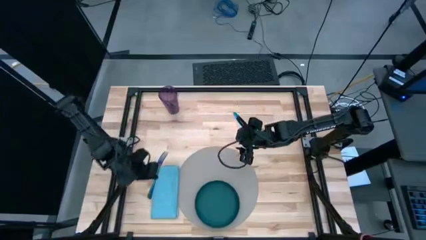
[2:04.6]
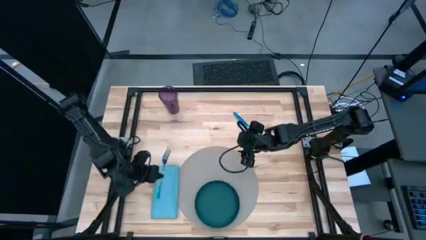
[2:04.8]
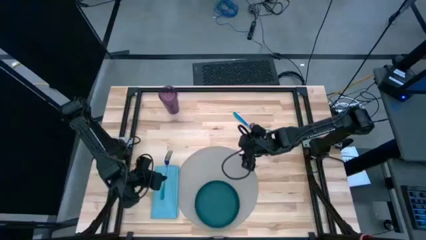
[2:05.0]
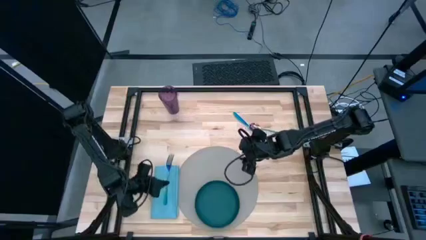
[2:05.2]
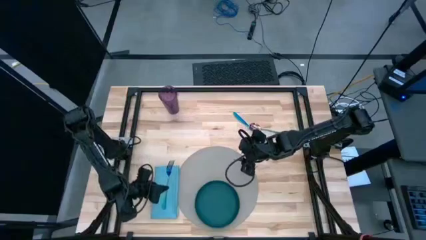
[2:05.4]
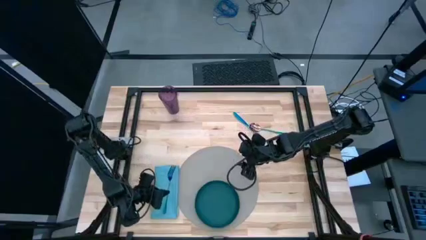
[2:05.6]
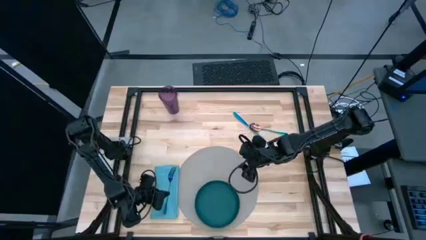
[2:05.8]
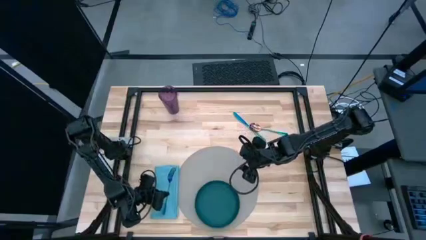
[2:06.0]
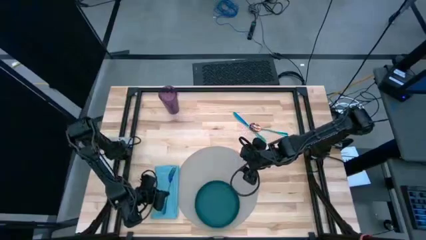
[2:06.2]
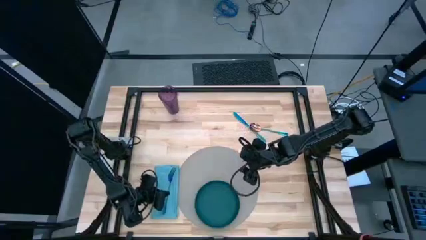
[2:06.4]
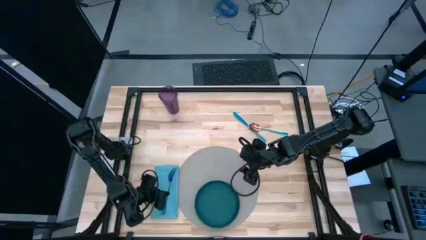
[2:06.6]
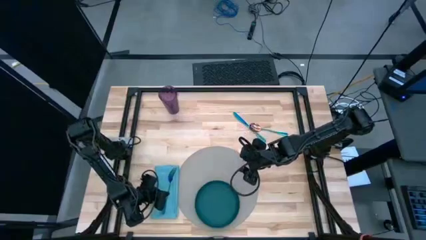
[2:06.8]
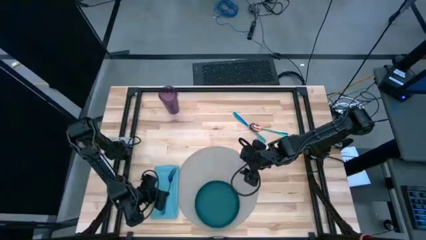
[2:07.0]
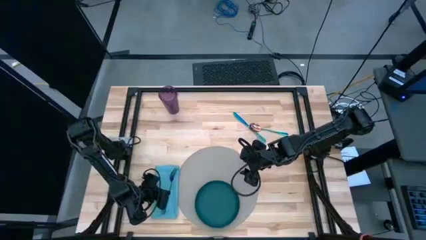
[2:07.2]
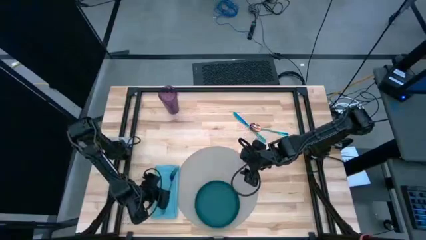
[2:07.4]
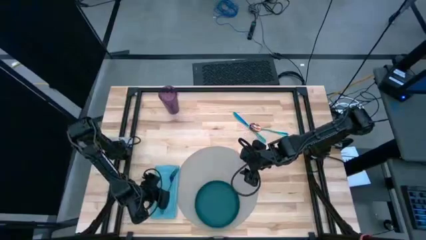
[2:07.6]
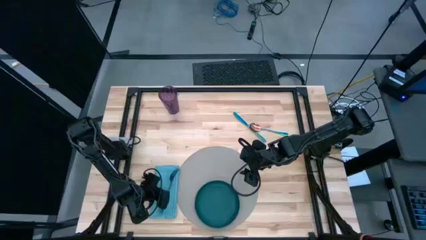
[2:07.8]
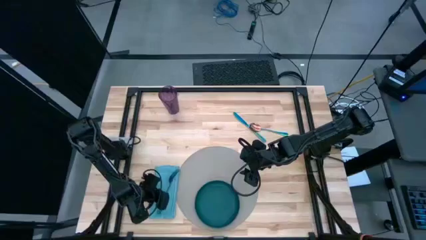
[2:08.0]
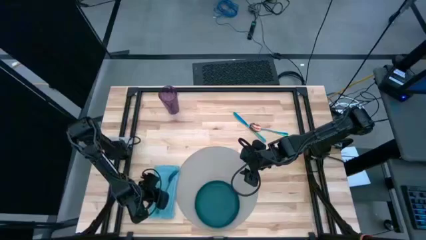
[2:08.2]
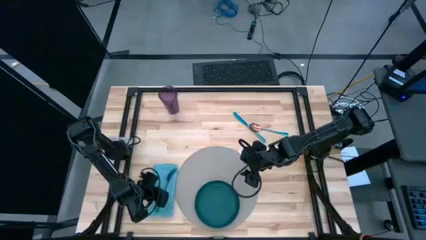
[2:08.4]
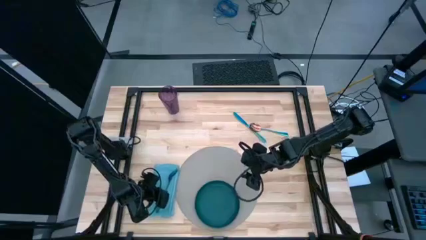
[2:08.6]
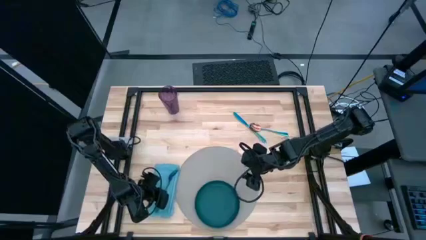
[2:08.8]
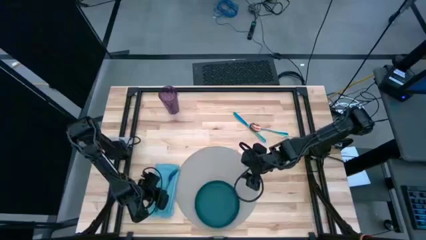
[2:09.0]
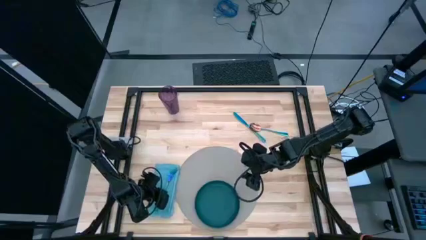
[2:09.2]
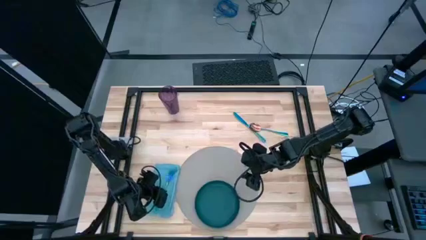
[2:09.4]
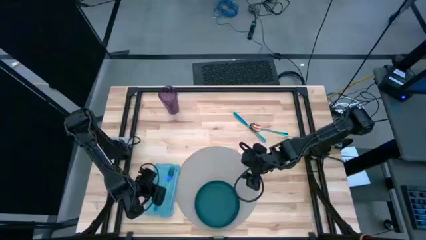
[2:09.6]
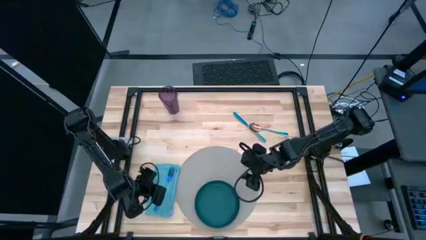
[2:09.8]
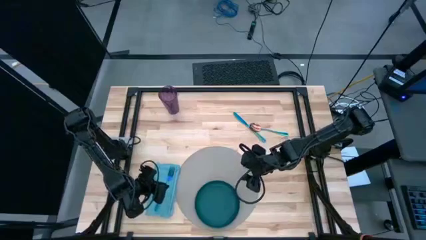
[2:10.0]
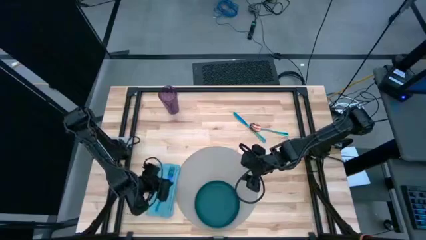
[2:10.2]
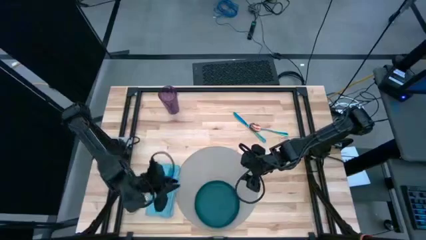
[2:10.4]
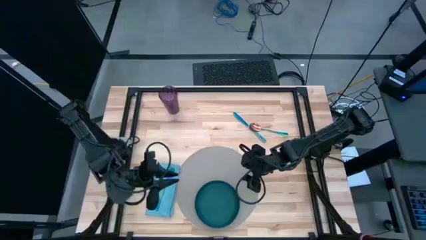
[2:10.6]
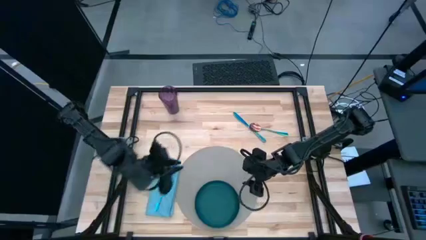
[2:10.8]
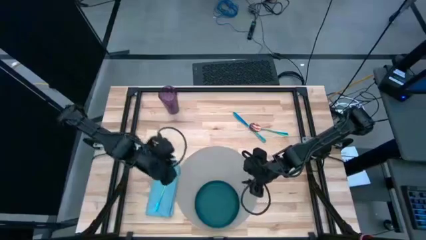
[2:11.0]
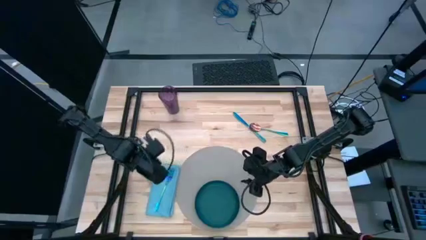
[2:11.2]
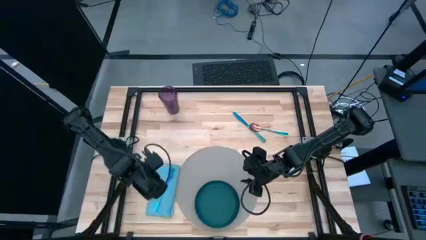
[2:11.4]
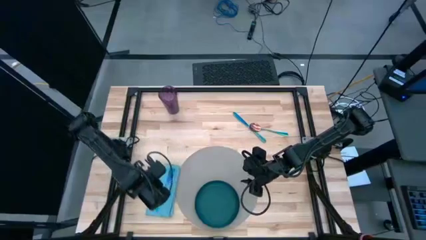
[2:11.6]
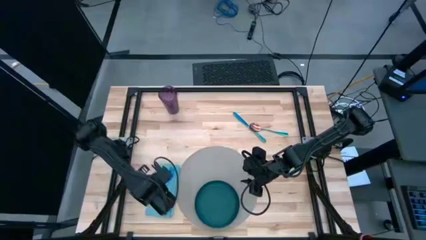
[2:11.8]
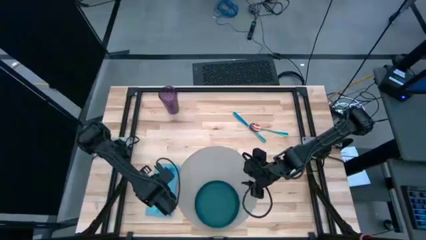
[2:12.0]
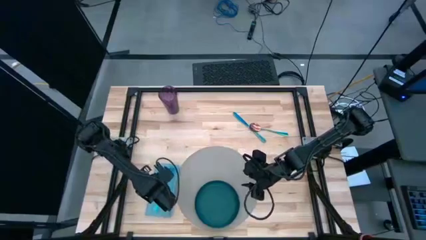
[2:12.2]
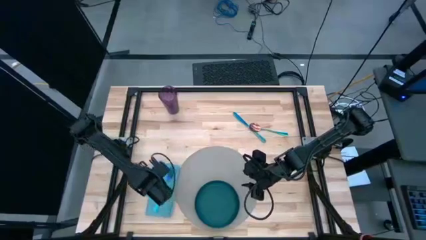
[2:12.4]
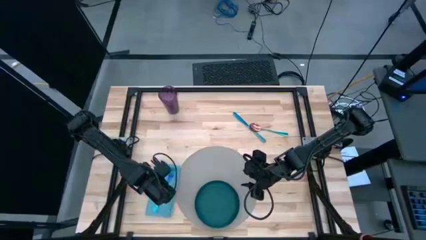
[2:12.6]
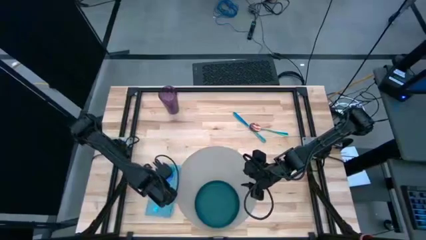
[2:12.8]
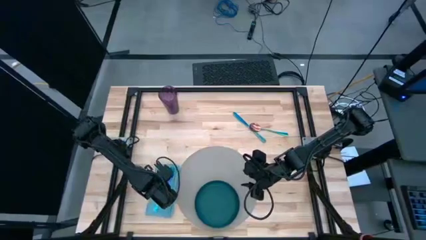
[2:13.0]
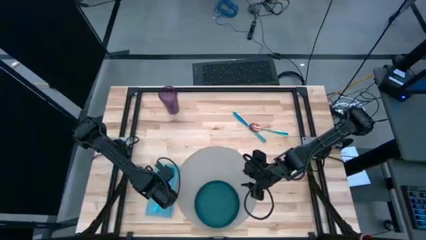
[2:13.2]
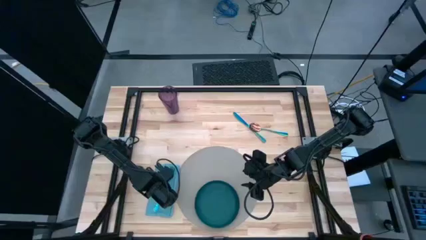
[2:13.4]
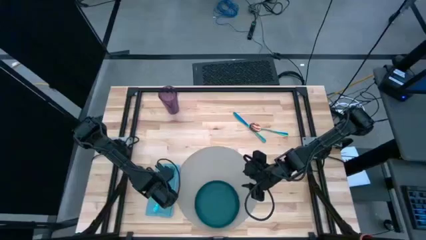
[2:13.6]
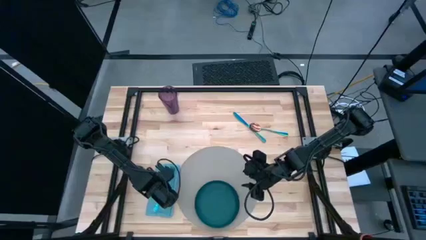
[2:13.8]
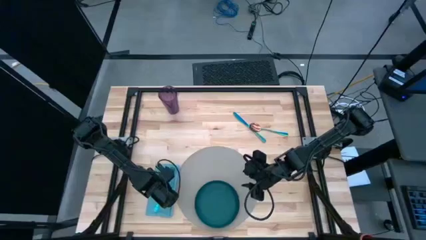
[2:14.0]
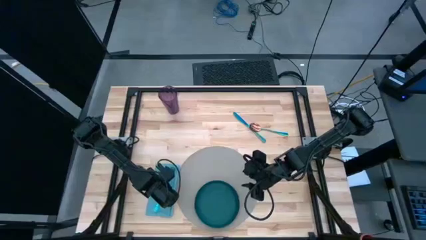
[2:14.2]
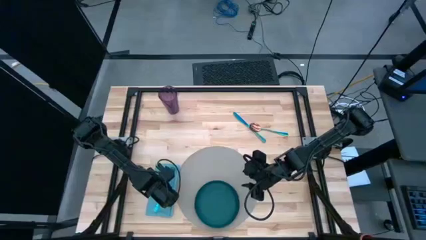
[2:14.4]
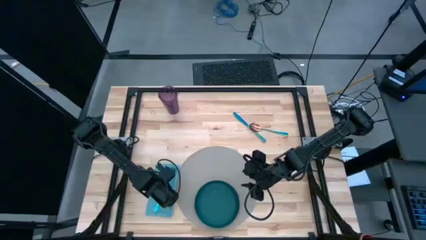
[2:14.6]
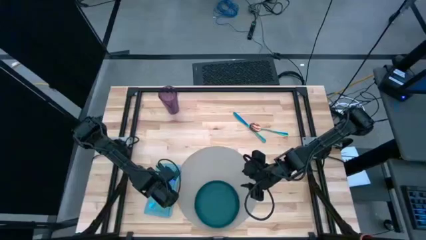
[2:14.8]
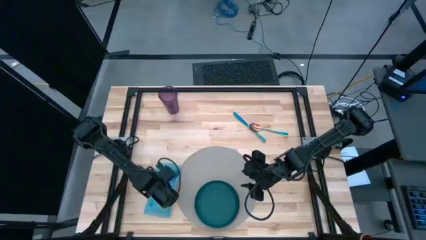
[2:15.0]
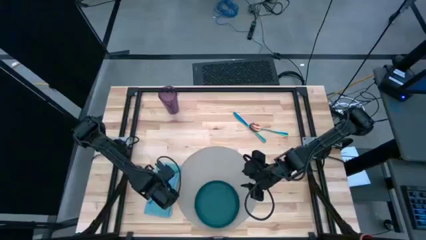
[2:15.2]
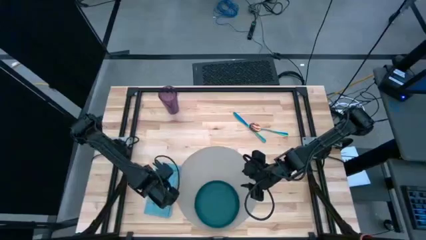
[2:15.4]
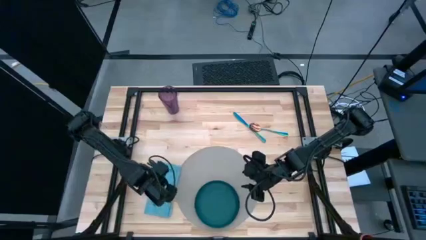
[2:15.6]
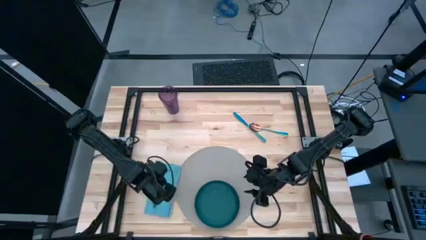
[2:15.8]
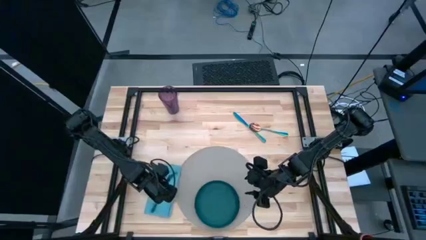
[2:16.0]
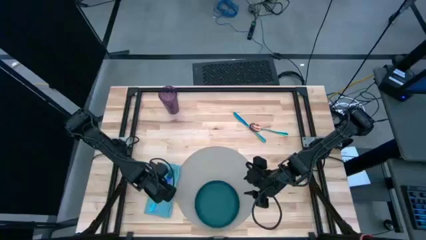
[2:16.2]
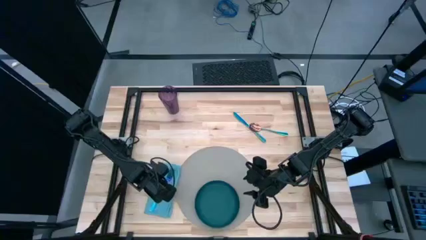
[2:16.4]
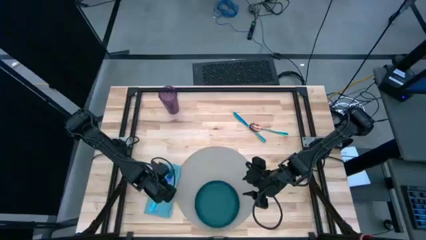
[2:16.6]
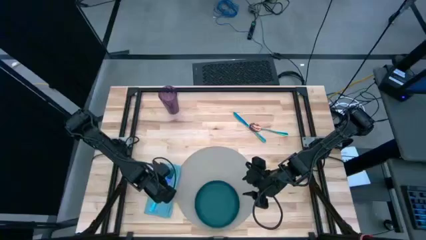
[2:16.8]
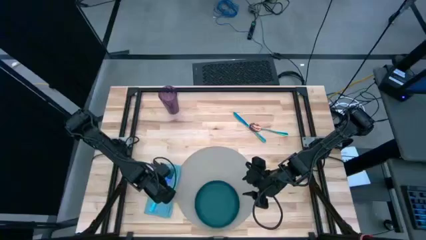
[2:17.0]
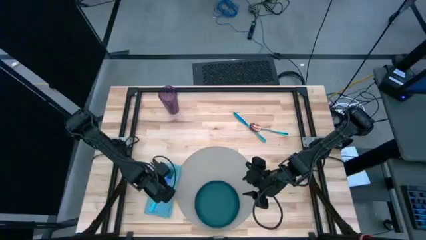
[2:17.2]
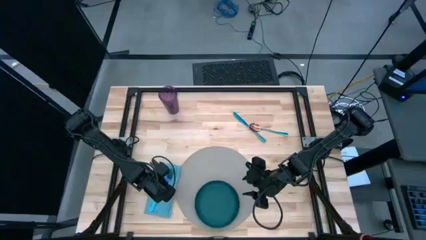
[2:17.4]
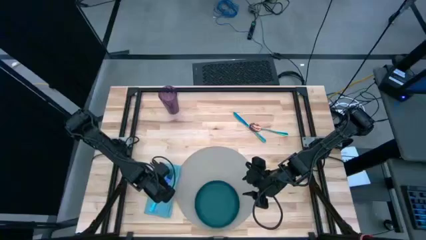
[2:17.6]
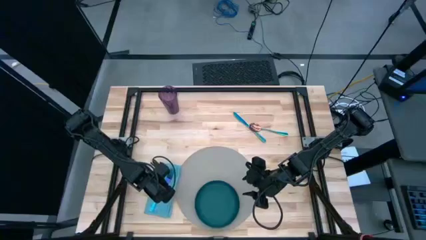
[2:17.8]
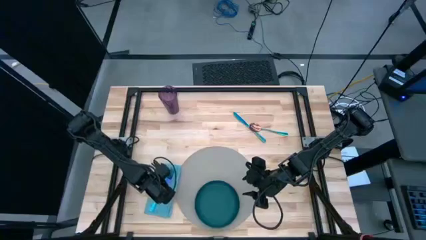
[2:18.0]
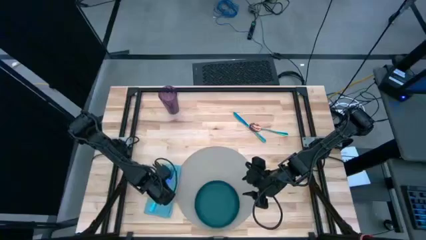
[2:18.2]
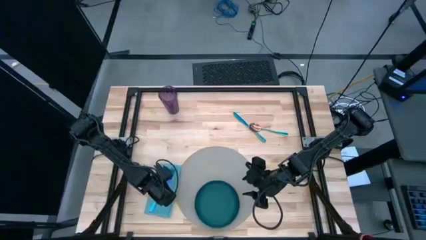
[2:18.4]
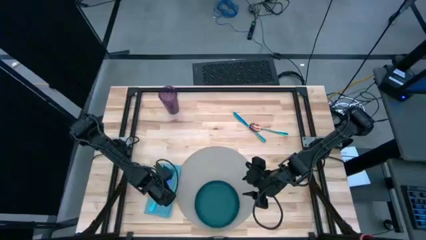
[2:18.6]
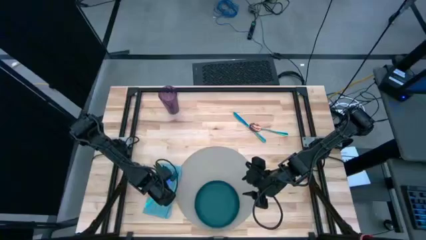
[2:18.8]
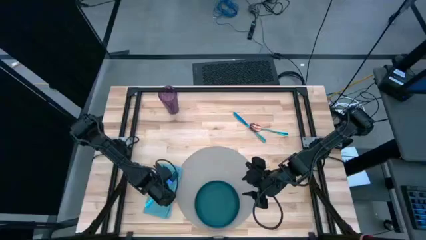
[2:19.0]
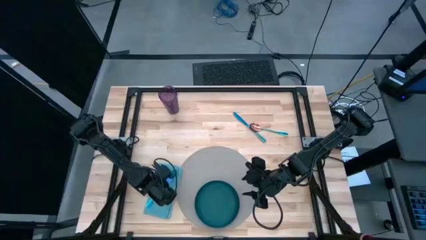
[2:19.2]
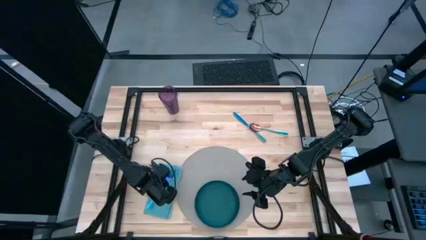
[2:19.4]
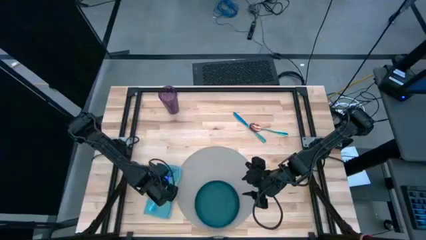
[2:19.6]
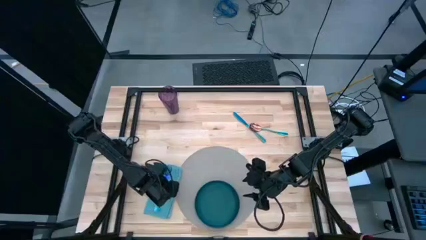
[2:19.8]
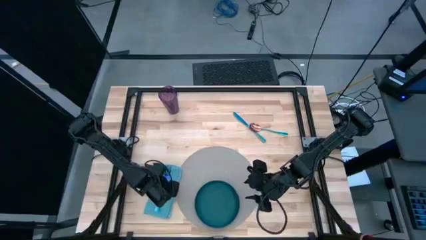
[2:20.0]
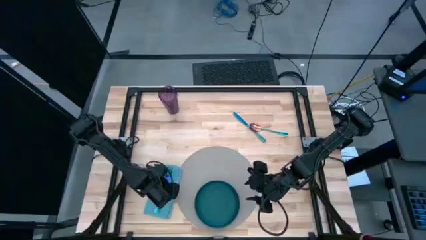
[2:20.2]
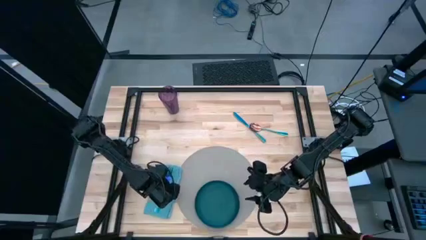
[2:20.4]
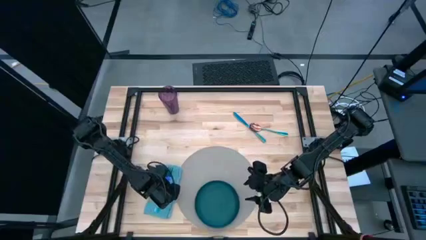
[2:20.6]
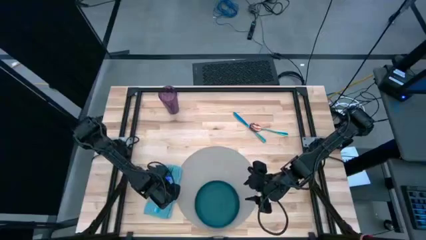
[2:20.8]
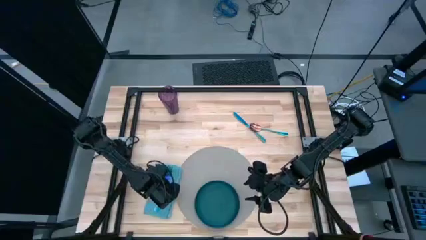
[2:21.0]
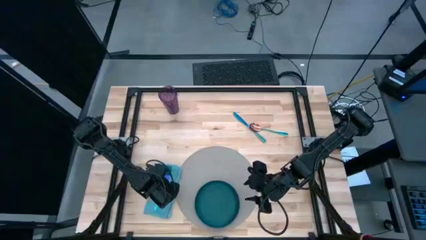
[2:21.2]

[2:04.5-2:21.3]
Task: Set table place
Put the blue fork on top of the blue table napkin
